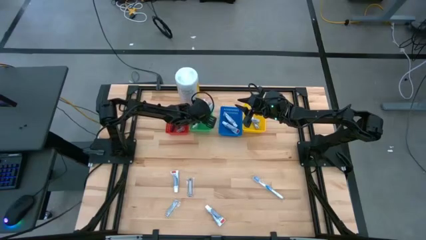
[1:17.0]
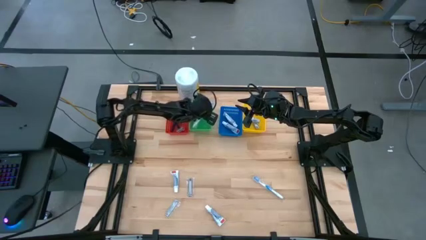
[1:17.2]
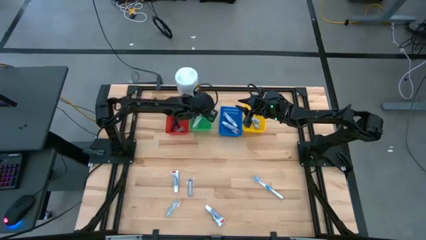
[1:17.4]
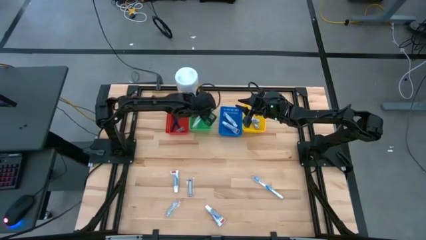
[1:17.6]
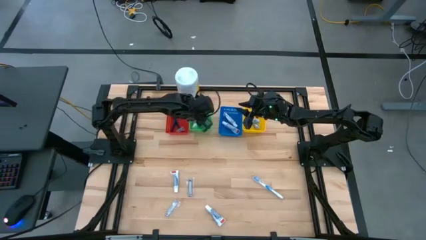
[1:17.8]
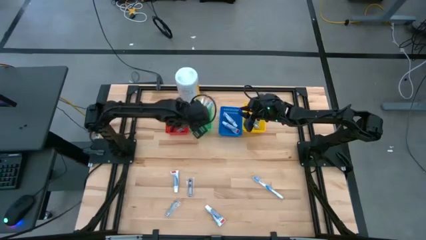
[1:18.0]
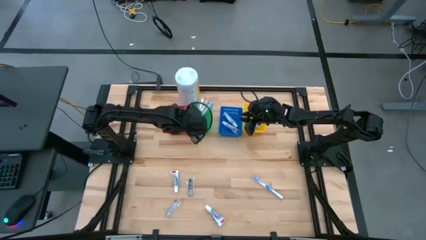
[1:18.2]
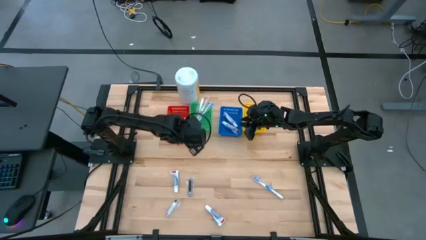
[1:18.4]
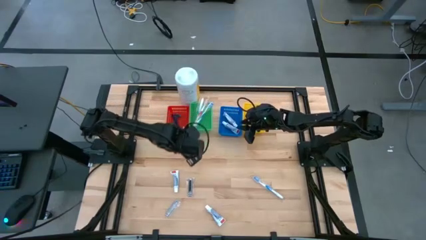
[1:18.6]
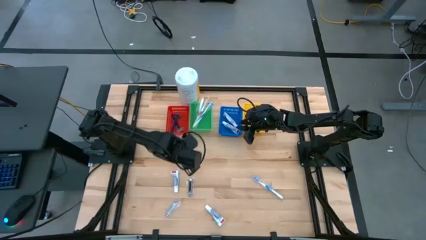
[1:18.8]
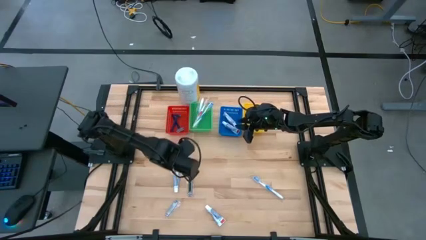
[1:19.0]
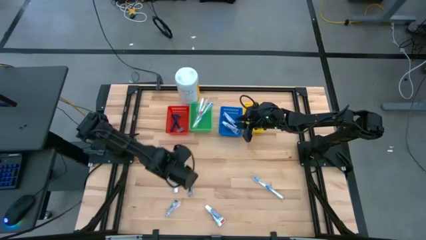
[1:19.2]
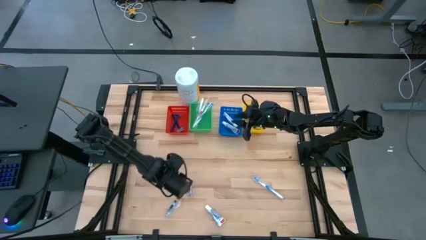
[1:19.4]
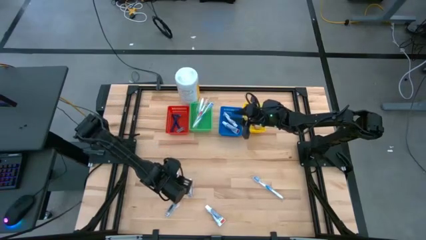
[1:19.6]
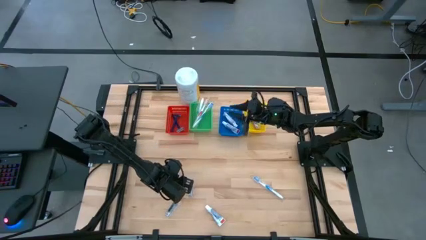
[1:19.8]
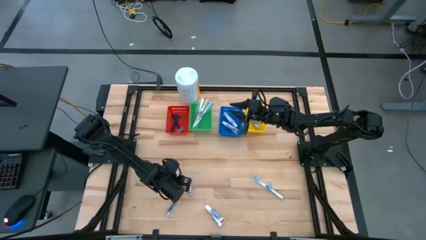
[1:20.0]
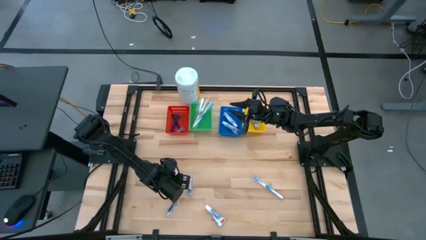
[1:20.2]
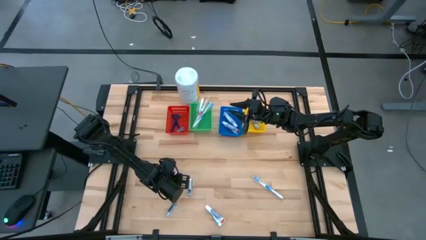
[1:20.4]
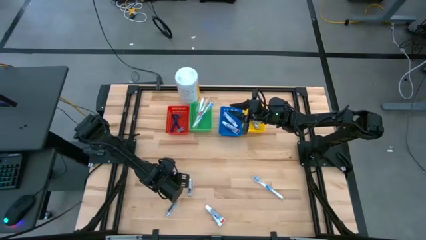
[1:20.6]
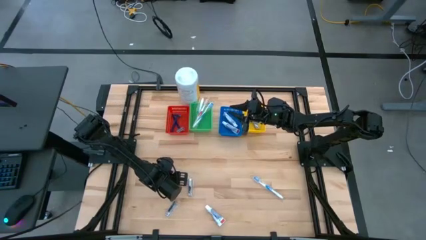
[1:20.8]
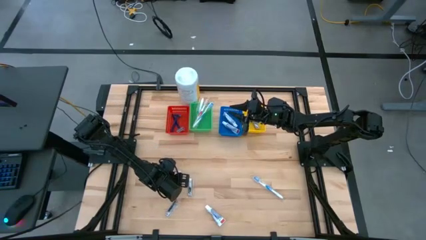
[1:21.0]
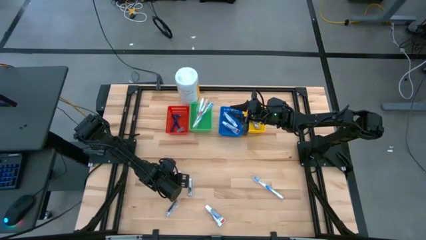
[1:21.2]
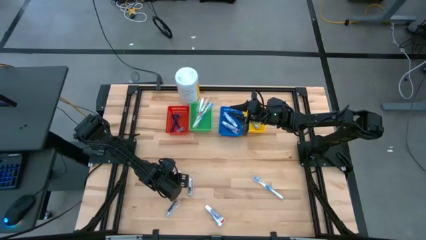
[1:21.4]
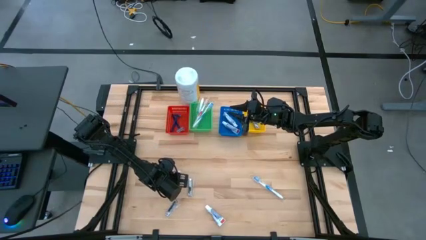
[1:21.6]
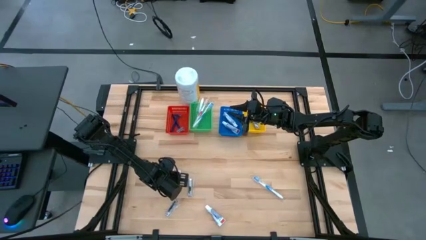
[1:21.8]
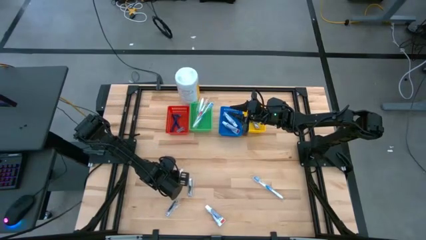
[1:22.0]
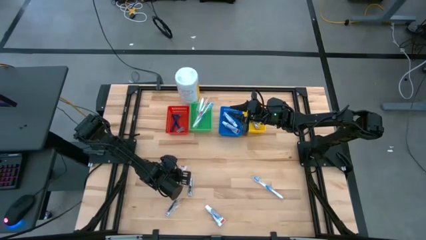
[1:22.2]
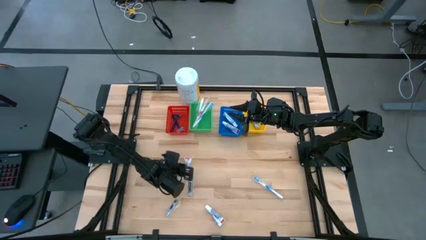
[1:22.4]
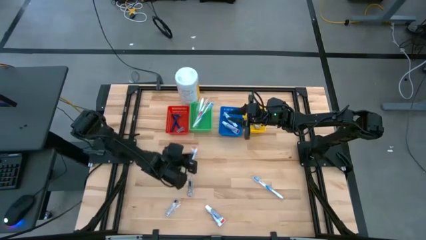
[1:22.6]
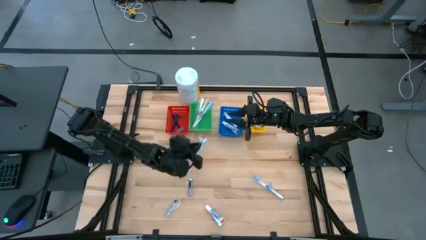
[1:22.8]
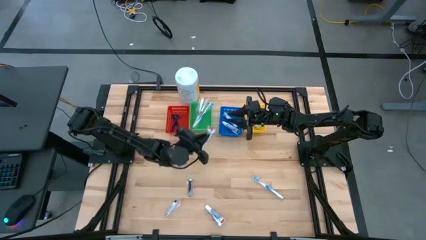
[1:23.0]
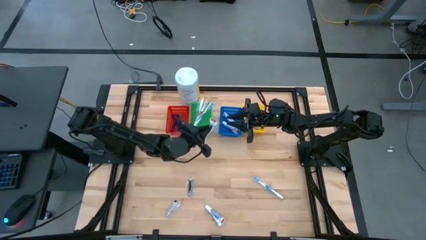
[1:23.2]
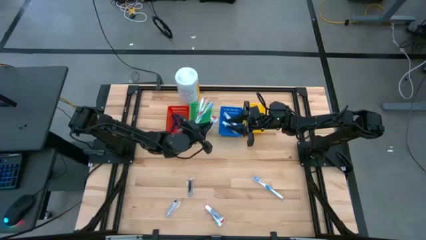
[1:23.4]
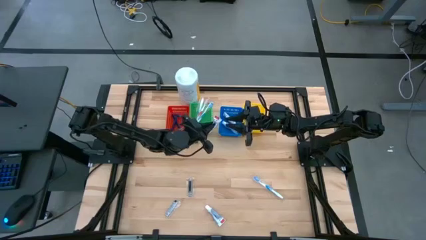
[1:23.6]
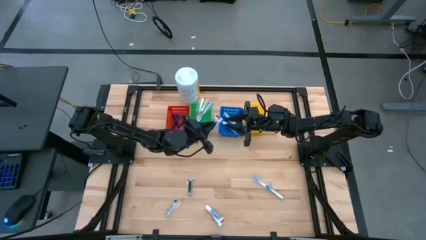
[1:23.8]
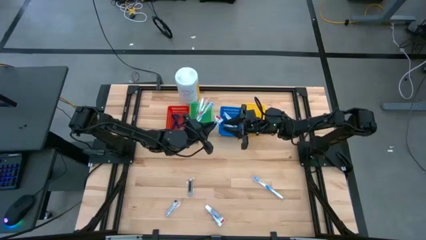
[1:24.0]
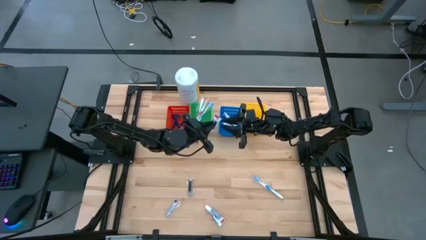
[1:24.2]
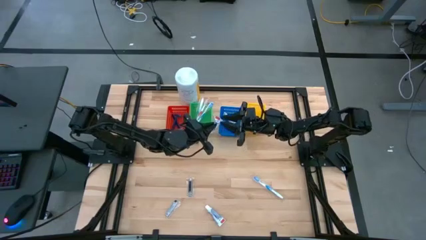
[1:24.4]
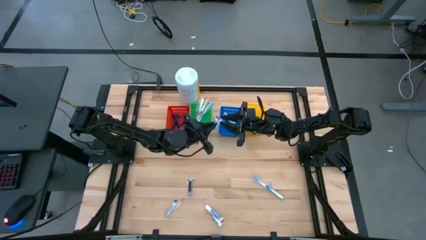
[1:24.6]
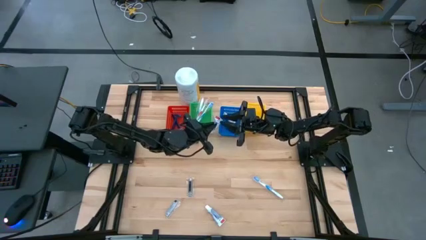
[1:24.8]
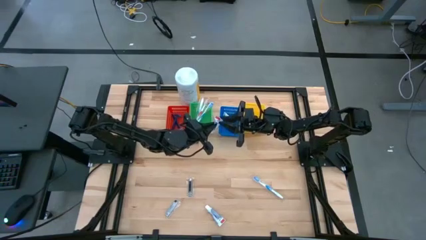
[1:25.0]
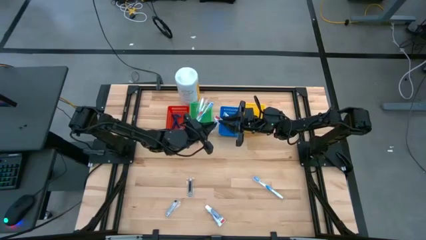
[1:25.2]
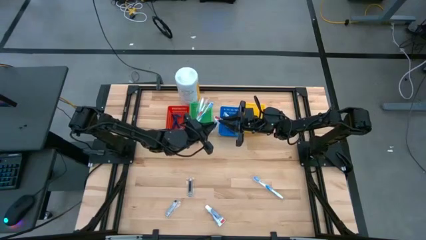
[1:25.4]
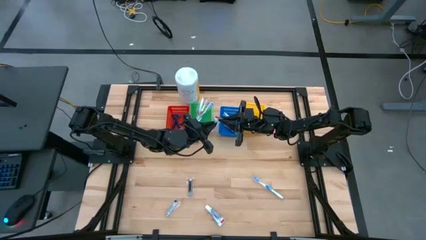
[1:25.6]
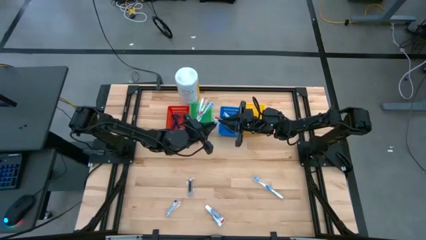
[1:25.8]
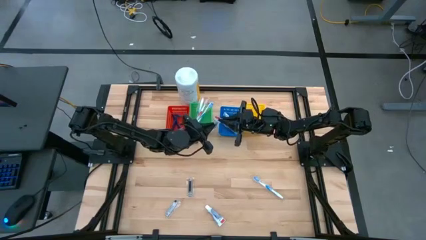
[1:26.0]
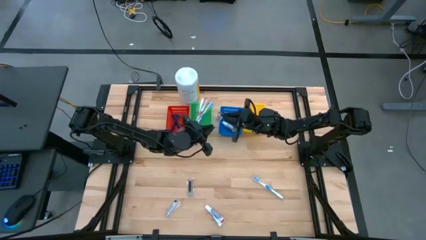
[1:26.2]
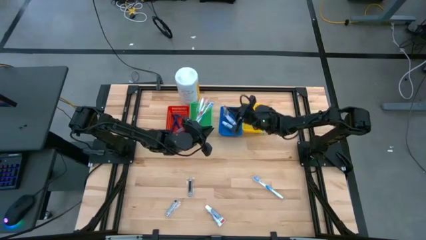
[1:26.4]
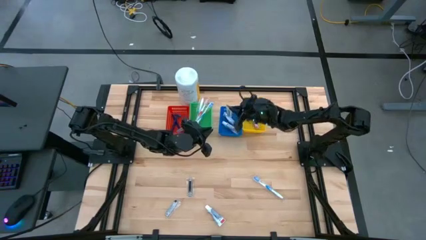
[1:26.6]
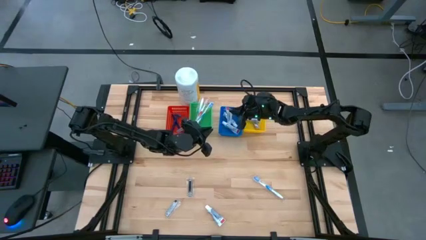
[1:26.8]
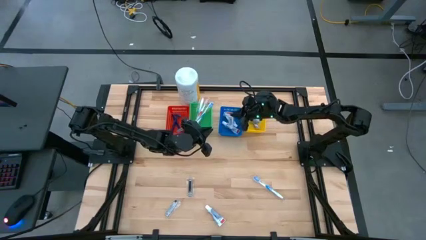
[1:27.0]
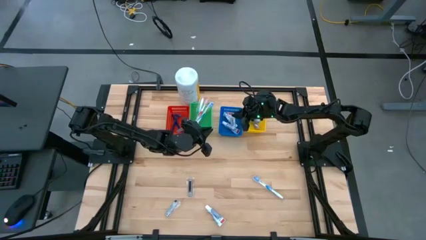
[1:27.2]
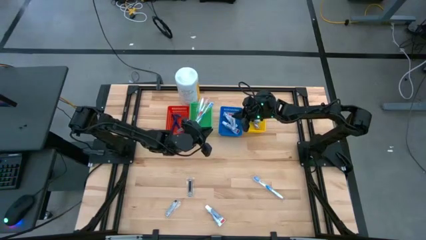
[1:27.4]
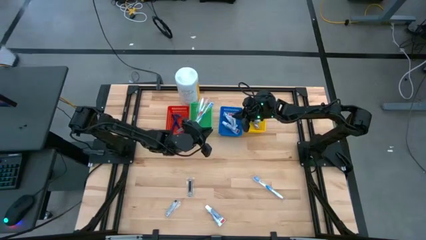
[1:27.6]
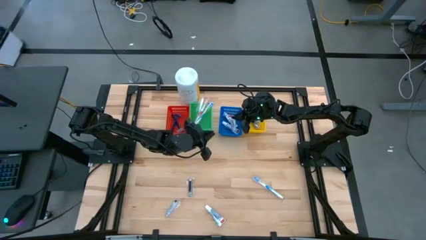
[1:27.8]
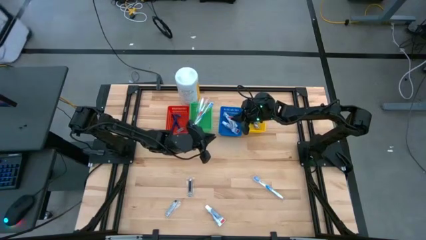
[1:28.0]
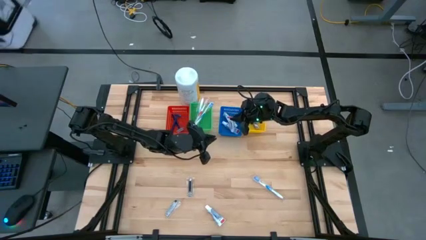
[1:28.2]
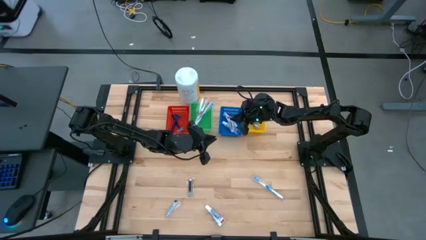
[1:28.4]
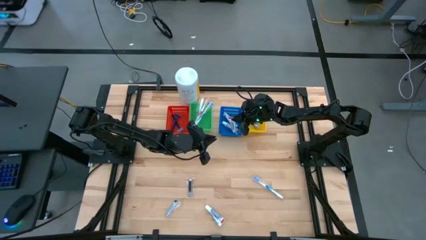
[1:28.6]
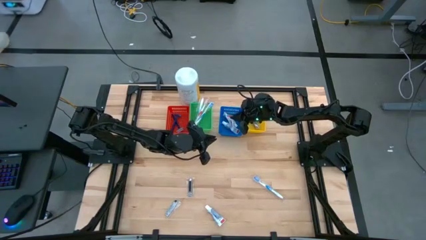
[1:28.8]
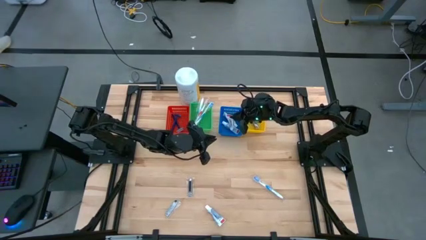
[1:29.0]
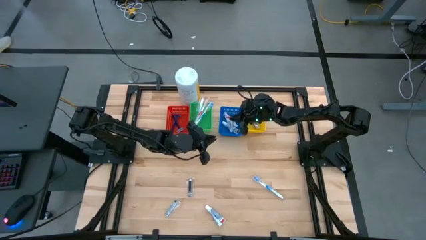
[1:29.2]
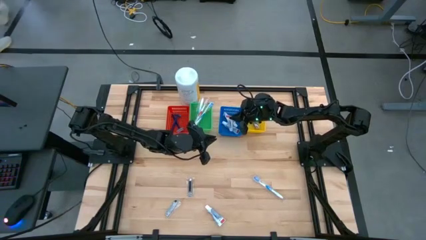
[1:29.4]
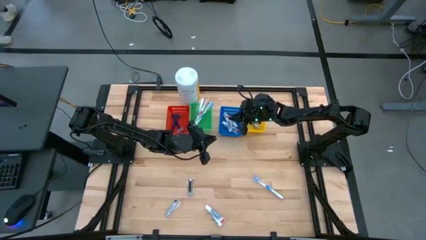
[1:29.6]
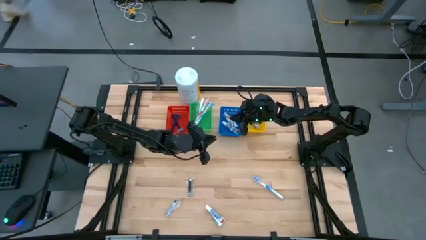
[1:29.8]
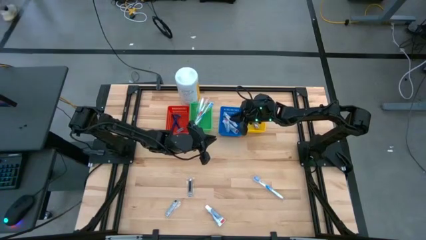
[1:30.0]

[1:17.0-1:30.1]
Task: Pick & Place Travel size toiletries
Put the white toothpaste into the blue bin

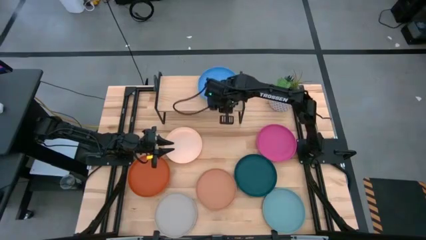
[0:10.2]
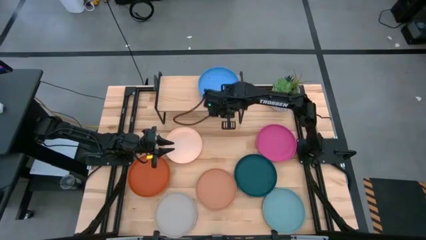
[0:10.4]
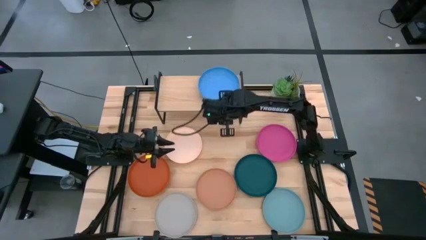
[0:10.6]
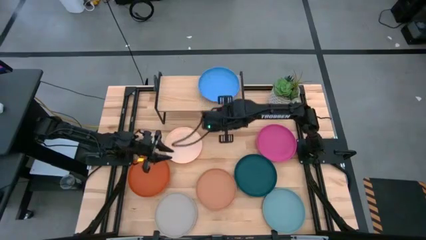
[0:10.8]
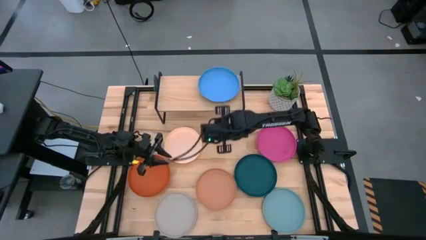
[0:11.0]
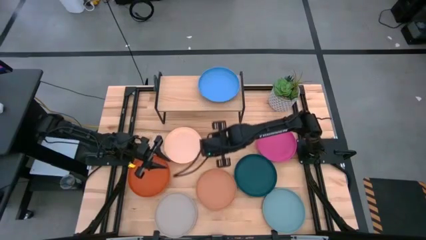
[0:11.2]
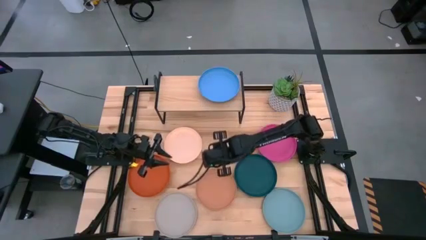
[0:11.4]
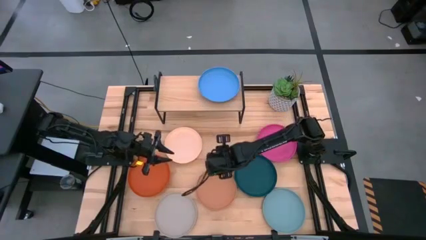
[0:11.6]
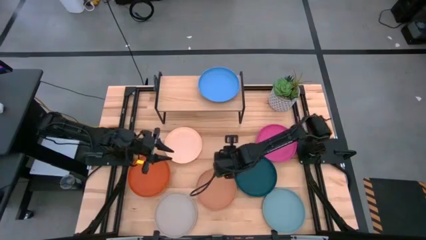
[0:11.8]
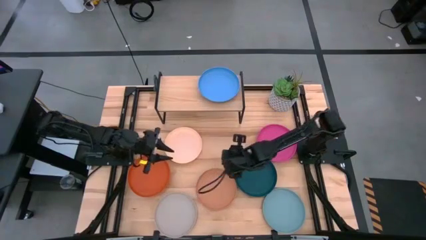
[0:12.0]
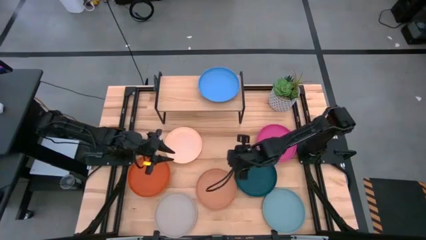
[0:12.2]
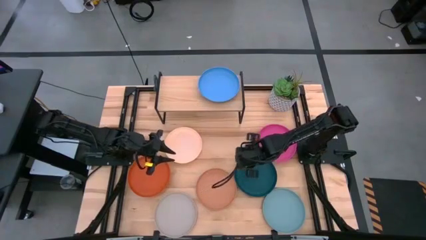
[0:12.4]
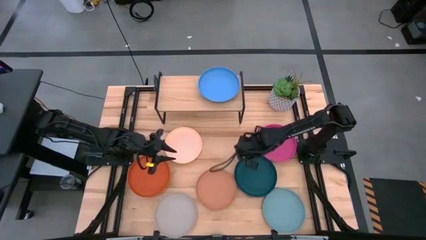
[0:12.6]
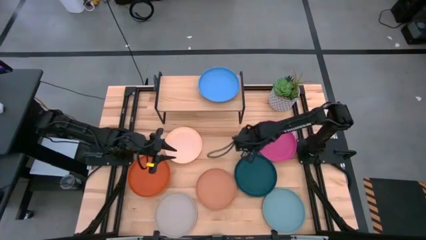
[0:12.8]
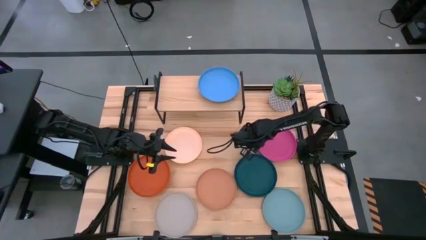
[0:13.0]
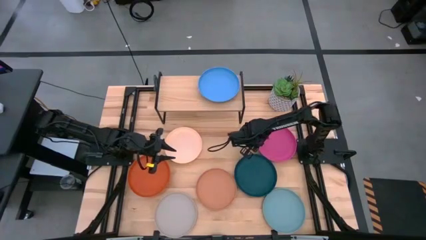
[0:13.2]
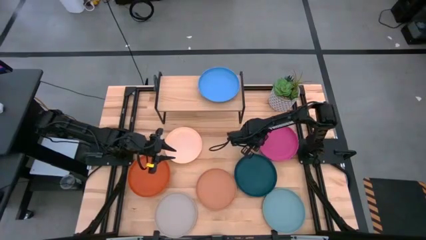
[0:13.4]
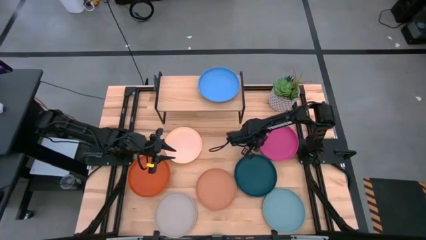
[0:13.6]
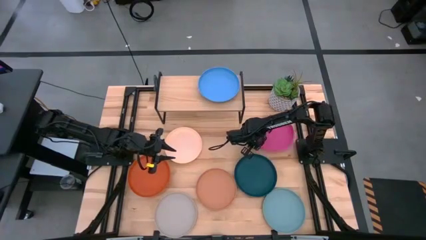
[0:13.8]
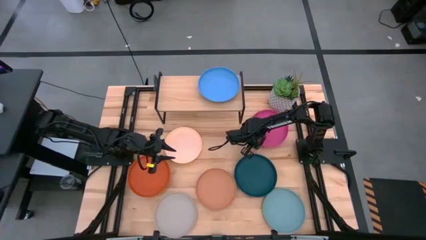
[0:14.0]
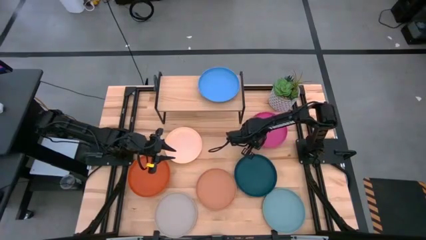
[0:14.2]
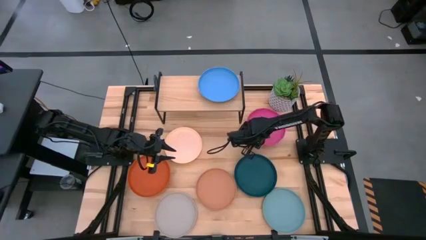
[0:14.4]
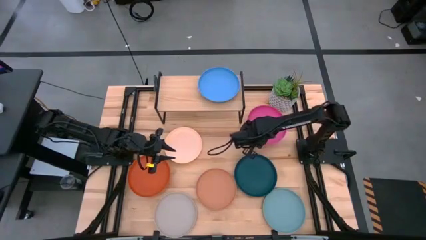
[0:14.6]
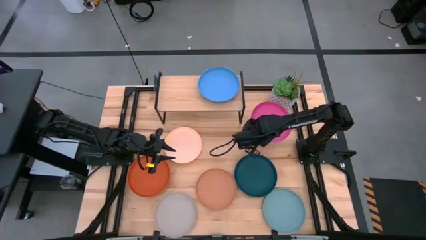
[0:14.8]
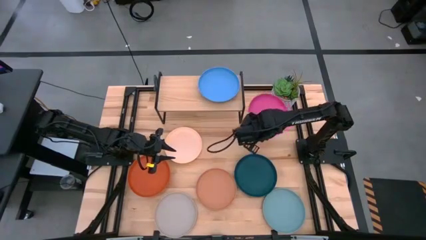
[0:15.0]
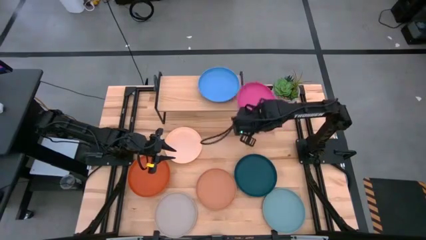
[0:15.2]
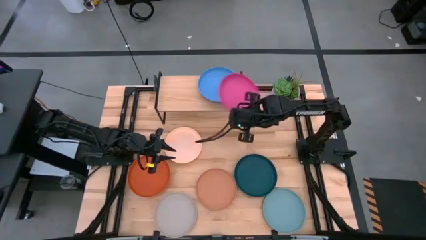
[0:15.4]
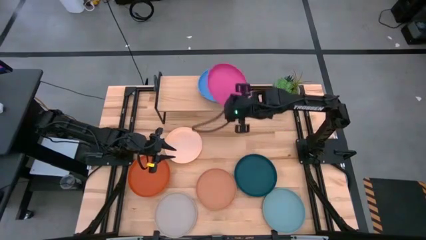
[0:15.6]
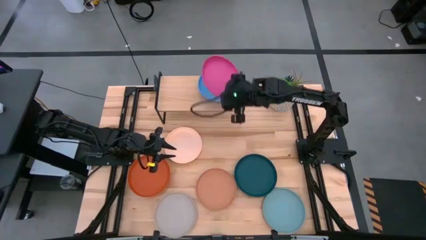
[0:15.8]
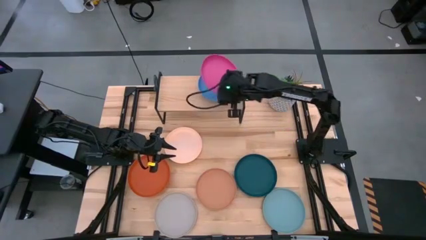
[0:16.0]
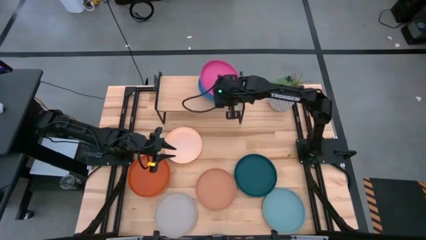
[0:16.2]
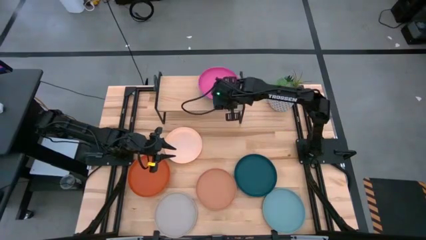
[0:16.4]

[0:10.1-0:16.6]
Task: Place and stack plates onto a shelf
Stack the pink plate on top of the blue plate on the shelf
